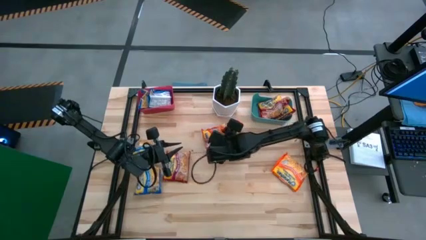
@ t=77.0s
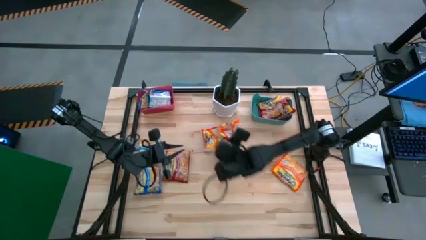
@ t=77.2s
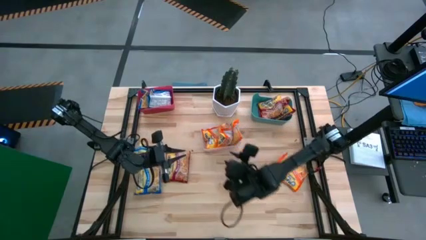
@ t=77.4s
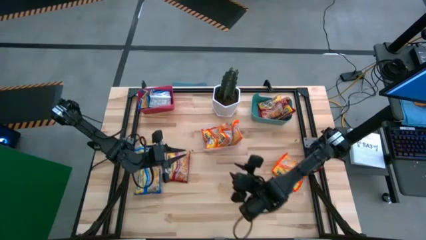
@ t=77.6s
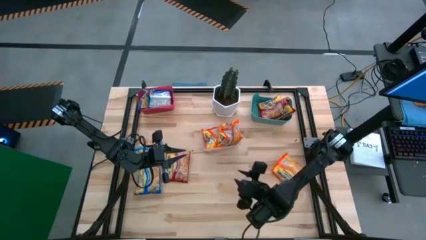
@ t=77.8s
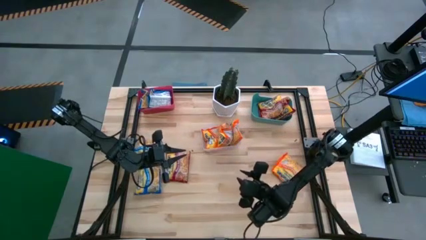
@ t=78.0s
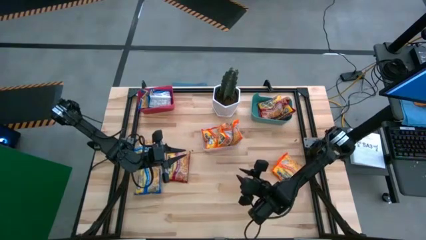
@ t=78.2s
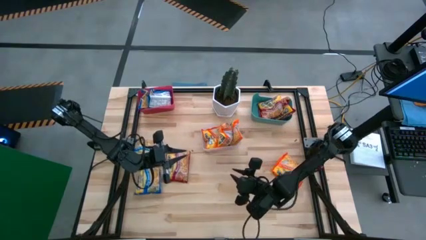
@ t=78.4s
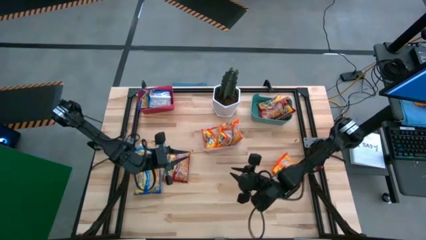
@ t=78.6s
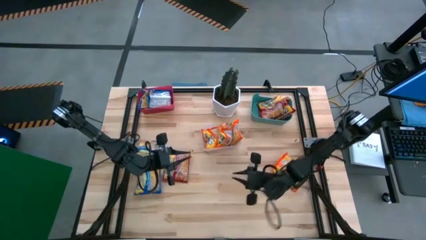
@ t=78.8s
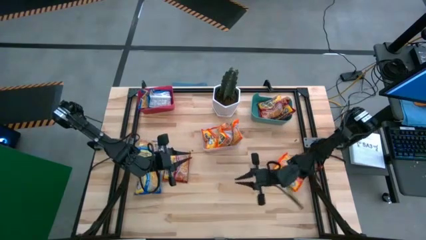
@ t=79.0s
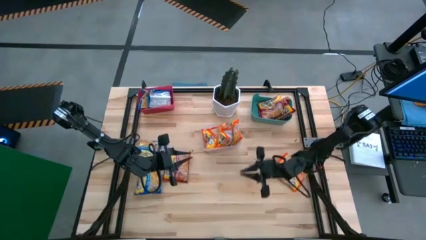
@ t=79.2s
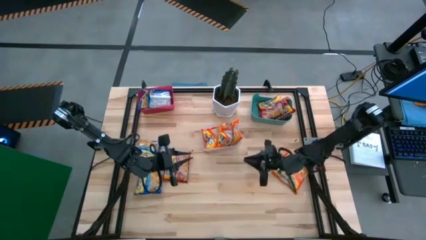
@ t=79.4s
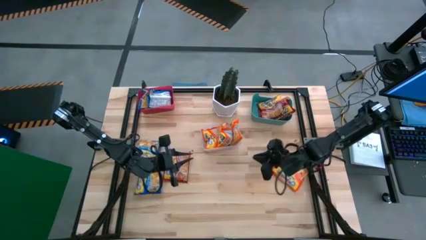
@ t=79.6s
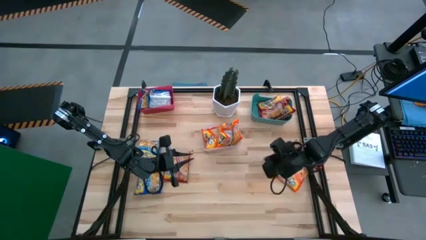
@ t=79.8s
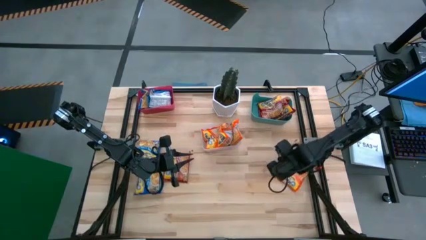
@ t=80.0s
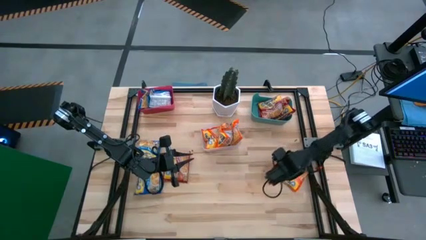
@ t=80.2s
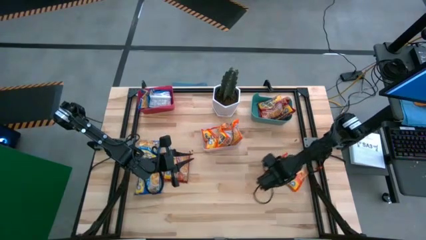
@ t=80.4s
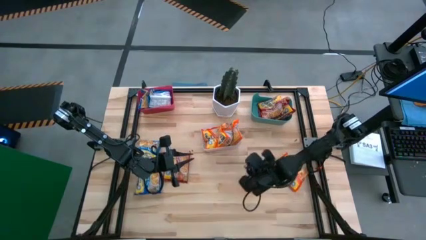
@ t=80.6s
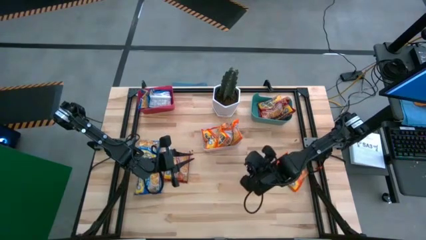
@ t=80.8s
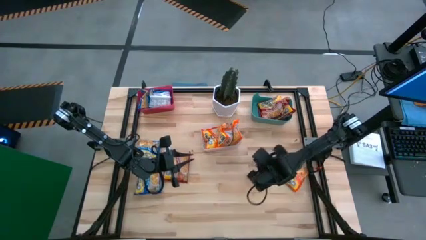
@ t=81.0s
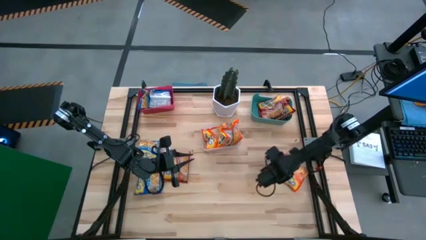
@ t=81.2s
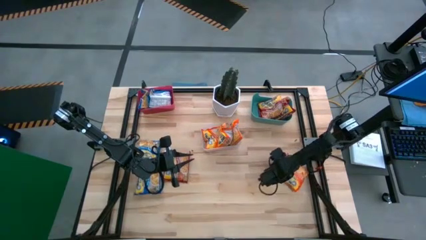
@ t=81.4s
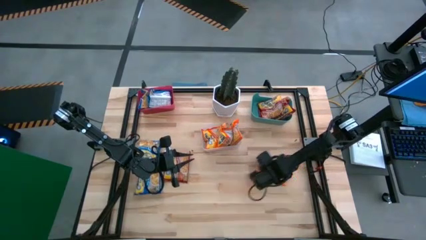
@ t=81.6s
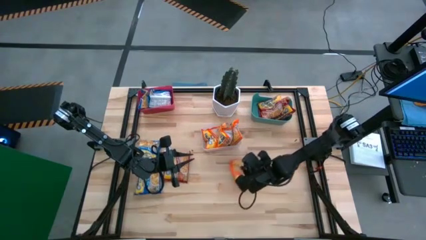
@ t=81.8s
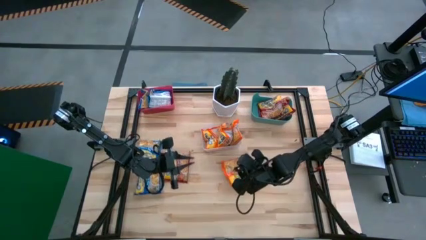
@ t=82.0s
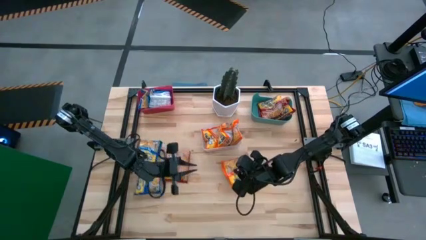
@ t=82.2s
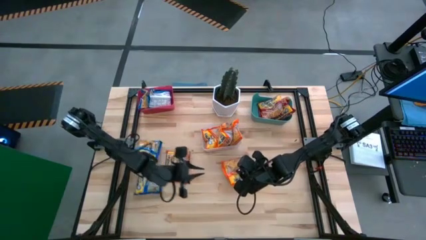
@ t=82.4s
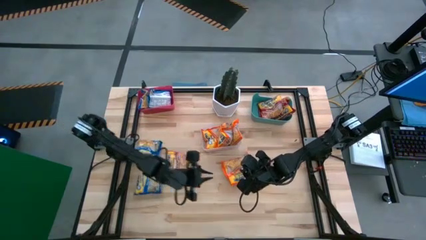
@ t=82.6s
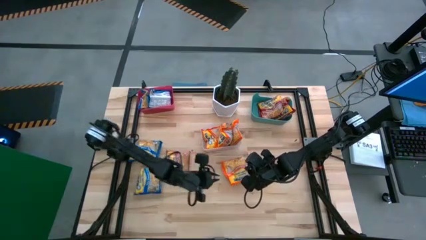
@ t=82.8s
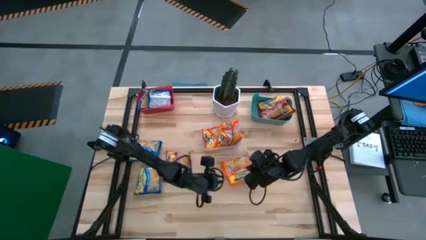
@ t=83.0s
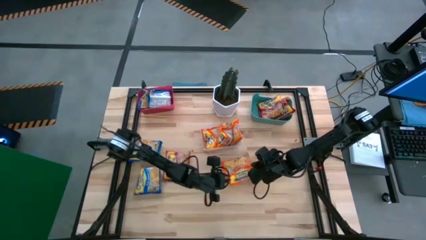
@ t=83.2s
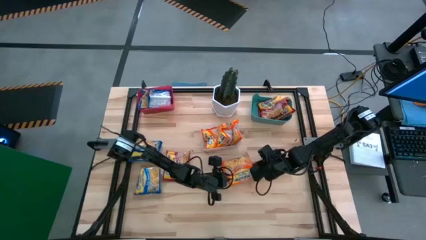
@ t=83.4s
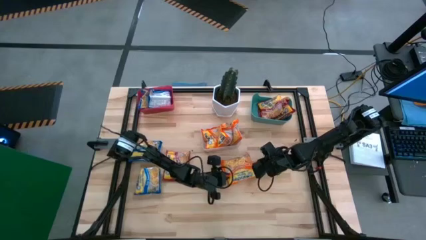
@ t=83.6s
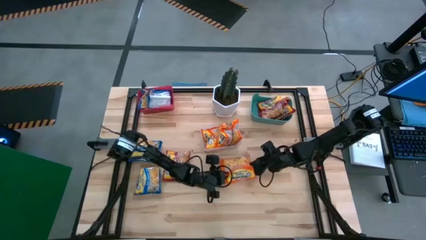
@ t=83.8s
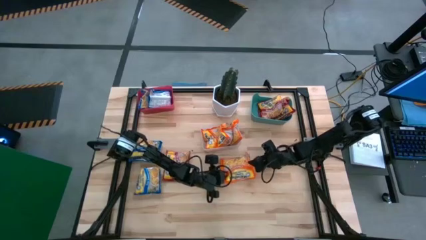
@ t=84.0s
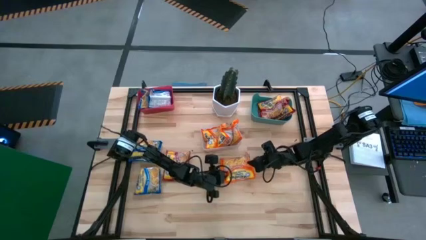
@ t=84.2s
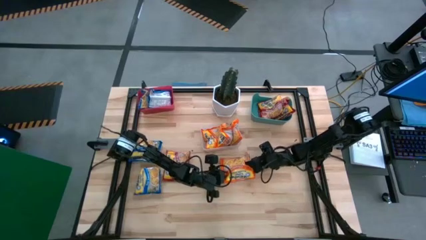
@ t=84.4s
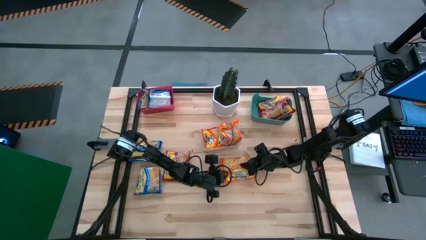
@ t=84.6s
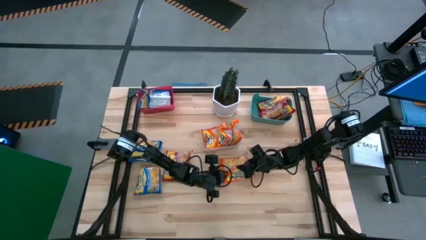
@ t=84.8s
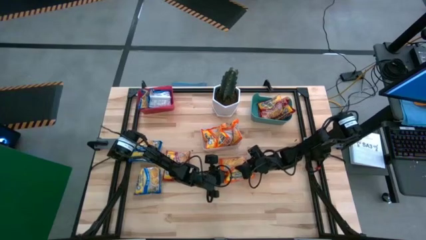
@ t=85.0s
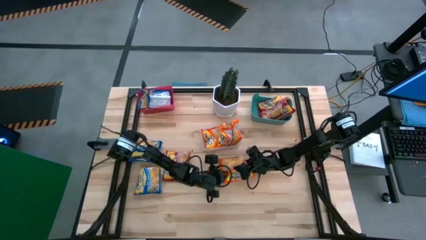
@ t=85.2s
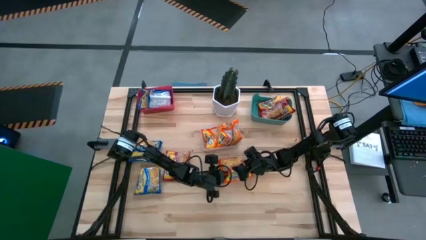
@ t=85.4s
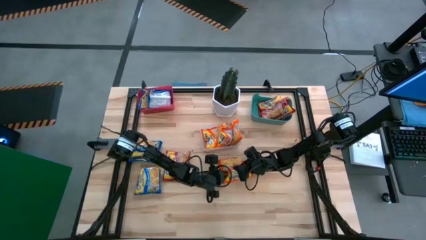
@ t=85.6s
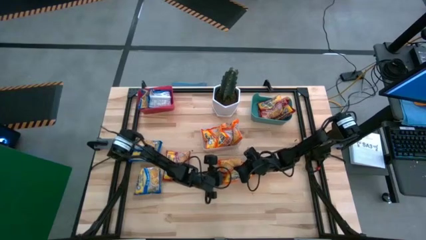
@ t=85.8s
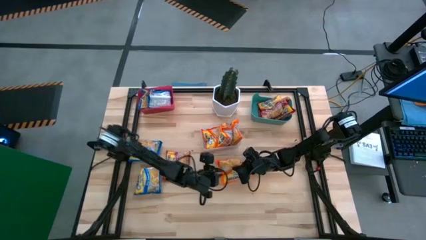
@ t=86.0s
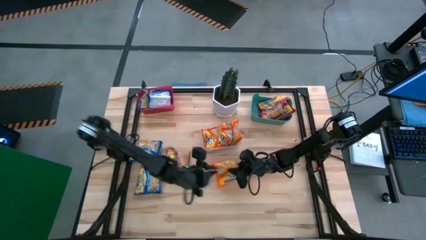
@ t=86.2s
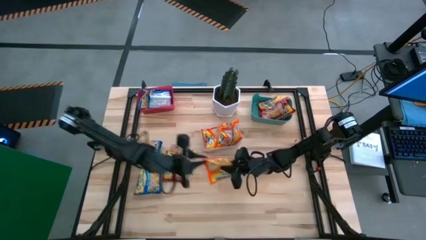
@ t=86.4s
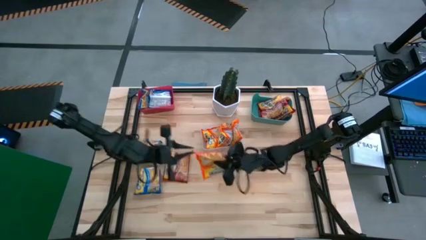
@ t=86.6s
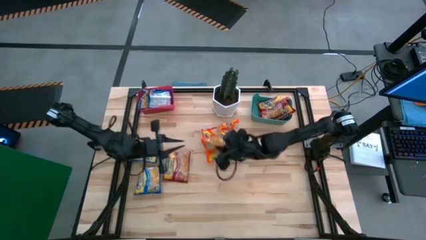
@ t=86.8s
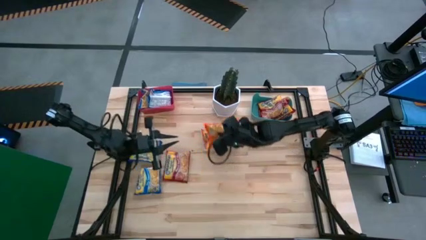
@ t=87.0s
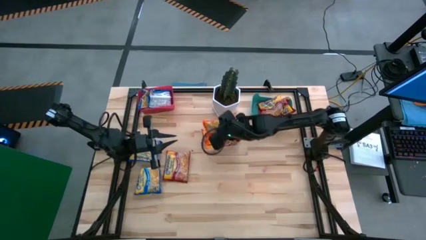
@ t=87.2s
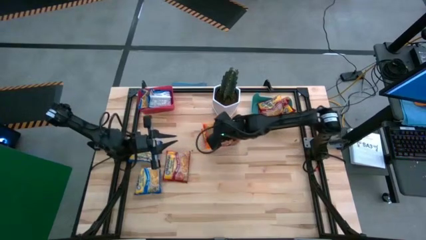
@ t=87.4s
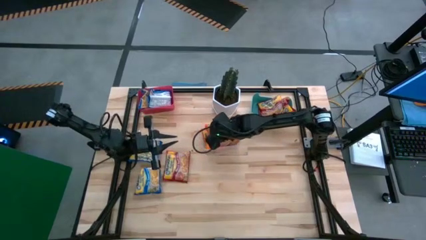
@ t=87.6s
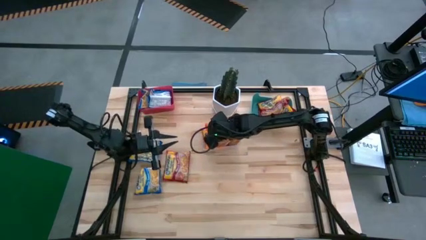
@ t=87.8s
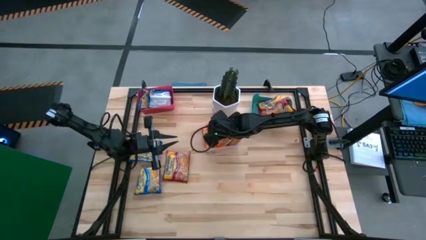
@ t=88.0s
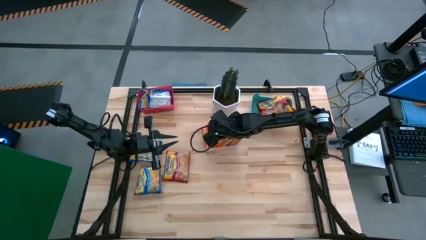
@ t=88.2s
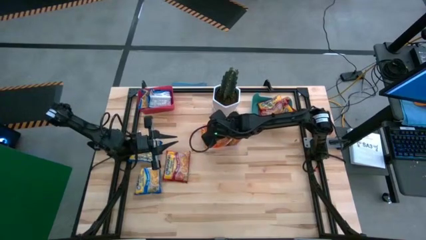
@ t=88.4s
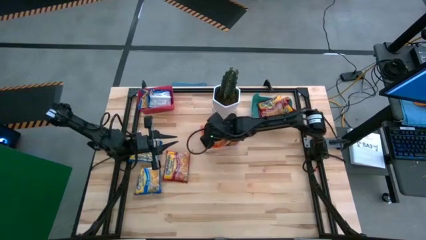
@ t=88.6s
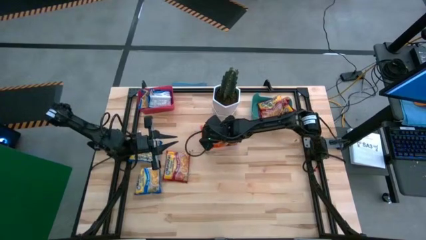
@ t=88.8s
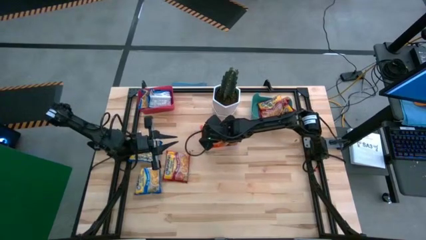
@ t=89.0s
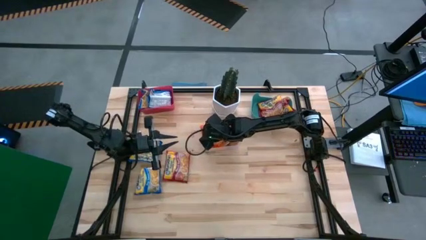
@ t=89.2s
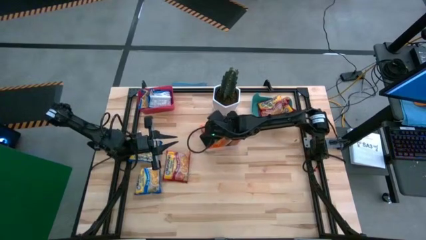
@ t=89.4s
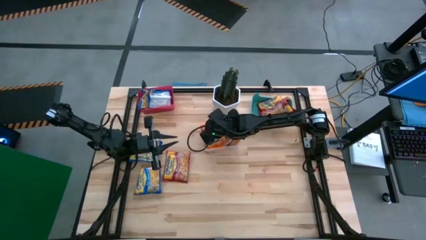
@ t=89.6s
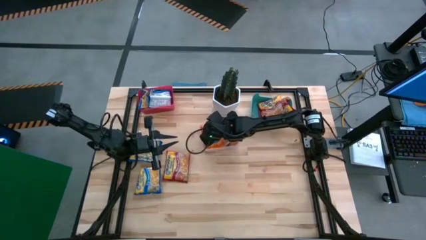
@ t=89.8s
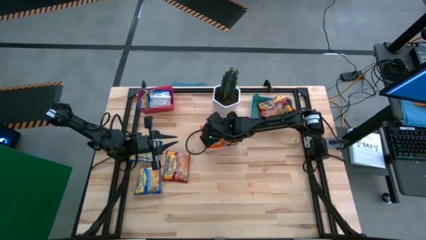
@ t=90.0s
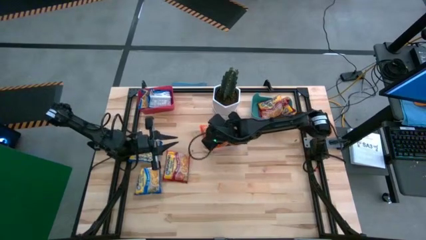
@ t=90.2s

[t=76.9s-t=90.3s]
Task: Sort Maruchan noodles
Put the orange noodle pack into the transparent bin

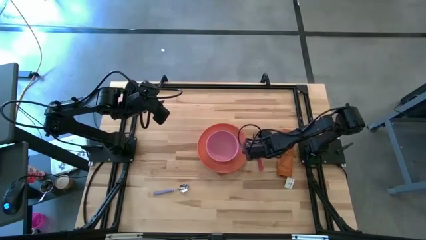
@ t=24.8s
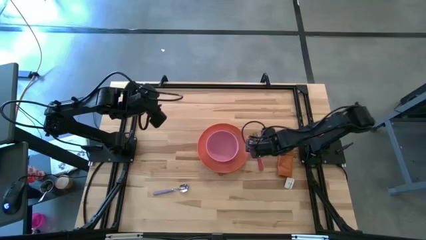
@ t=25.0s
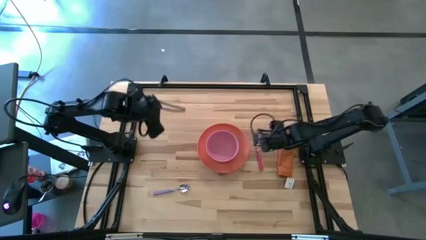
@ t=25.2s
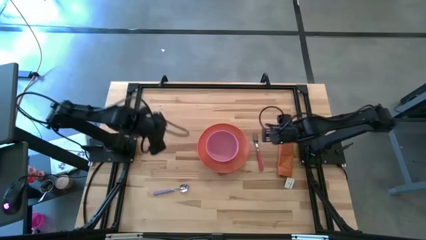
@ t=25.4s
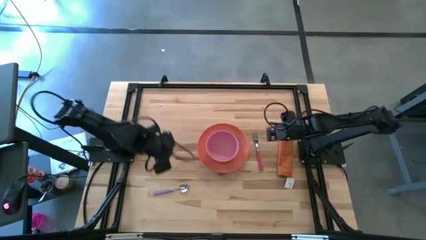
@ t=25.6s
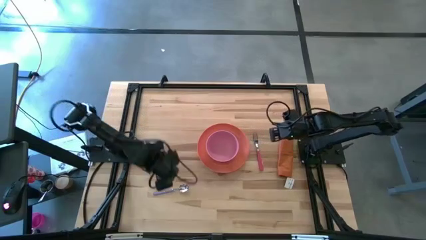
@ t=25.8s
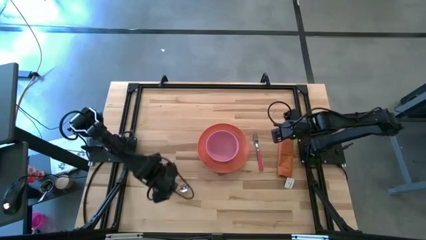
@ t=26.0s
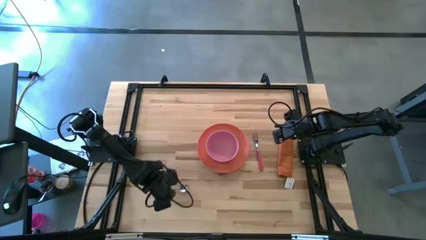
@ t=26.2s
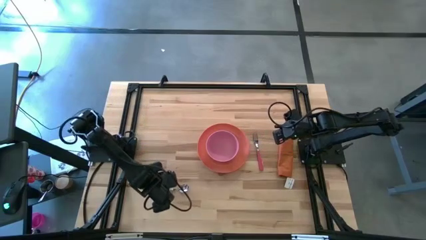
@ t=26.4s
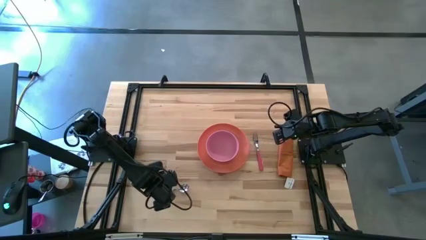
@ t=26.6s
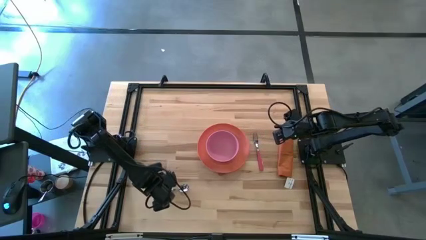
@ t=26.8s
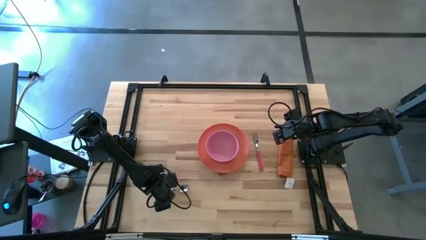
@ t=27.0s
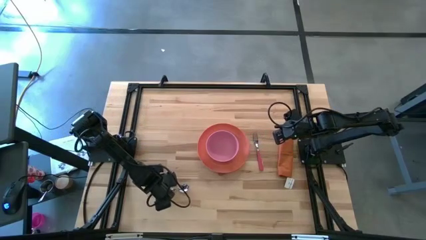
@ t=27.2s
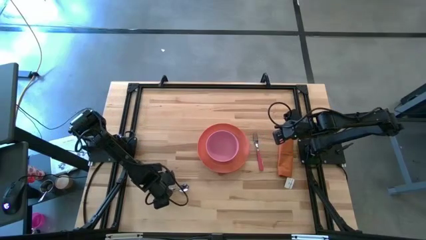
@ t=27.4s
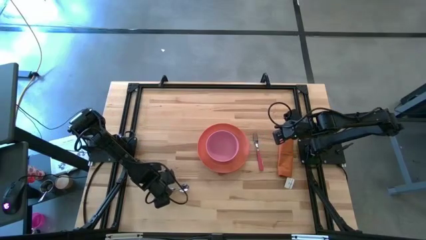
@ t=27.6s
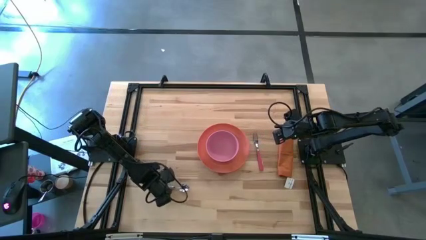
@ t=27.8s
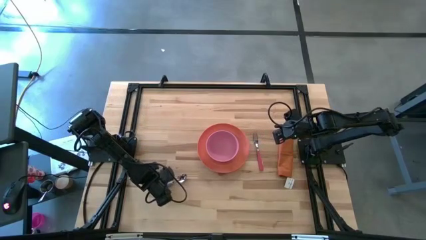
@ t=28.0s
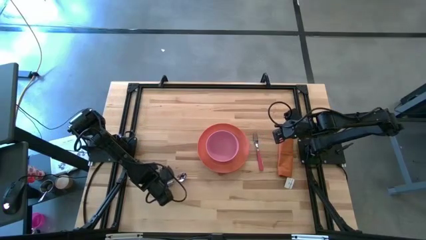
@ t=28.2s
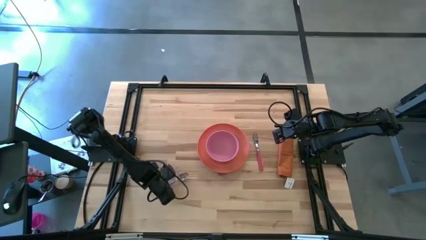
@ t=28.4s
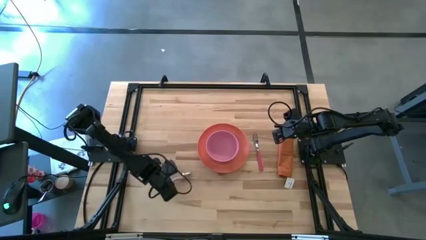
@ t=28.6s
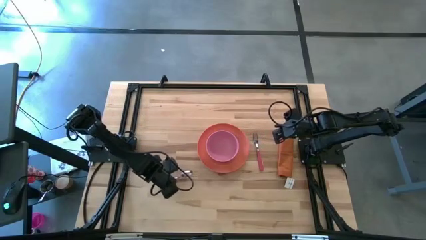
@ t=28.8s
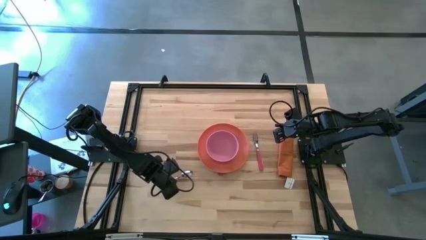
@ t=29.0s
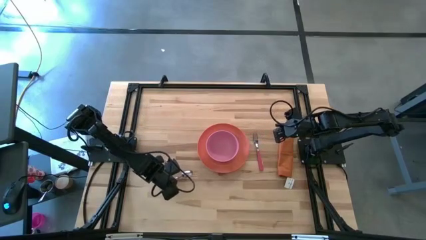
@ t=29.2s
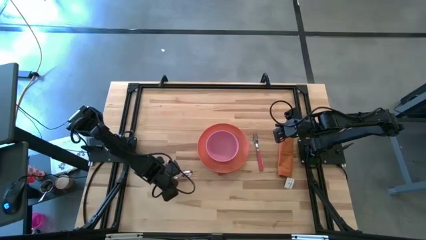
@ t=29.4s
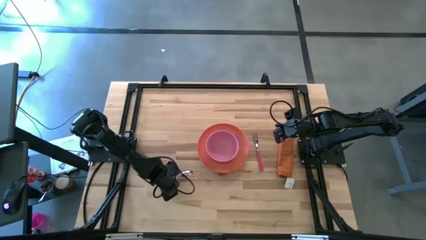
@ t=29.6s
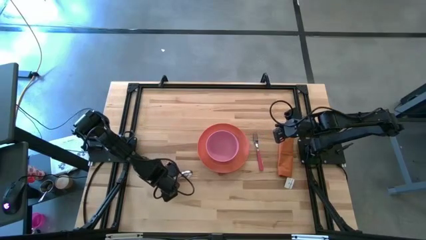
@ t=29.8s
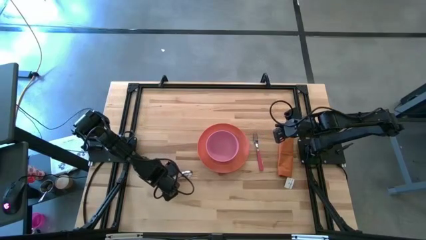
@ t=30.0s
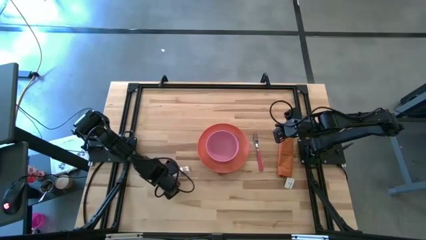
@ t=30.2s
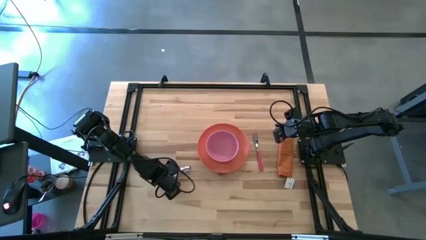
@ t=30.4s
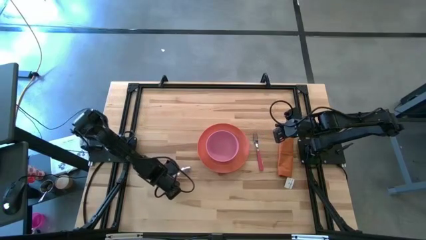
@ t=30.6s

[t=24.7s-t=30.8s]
Task: Set table place
Put the spoon into the bowl on the plate
